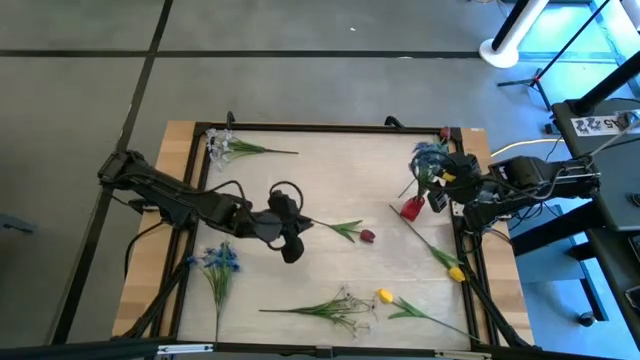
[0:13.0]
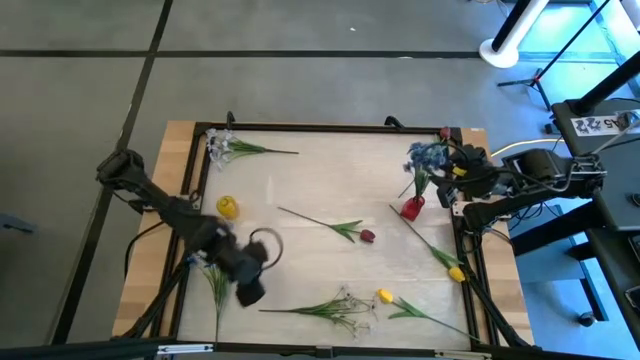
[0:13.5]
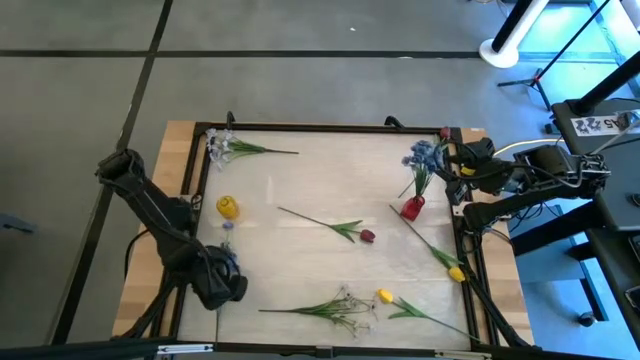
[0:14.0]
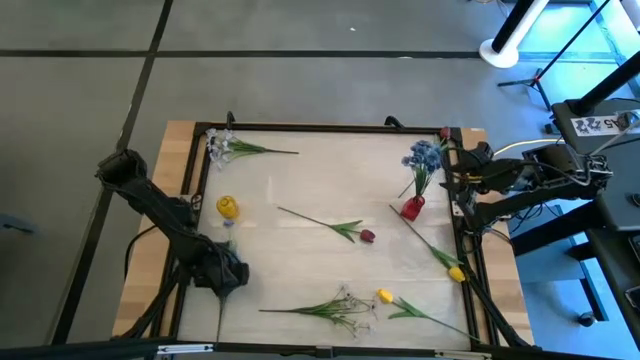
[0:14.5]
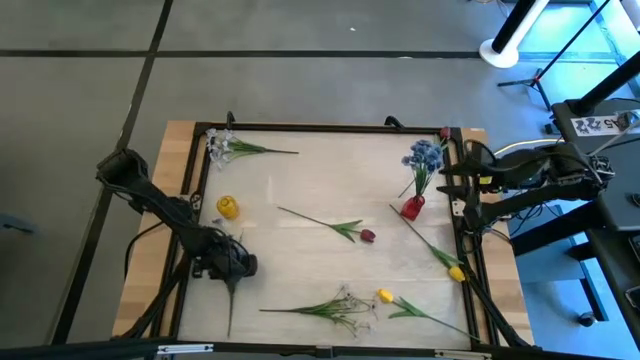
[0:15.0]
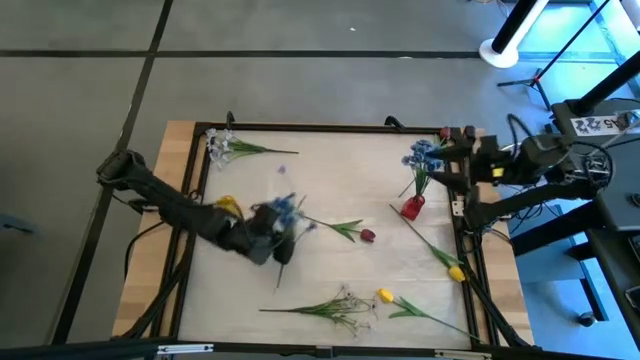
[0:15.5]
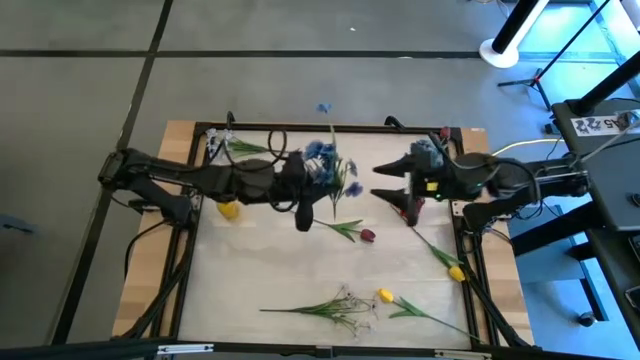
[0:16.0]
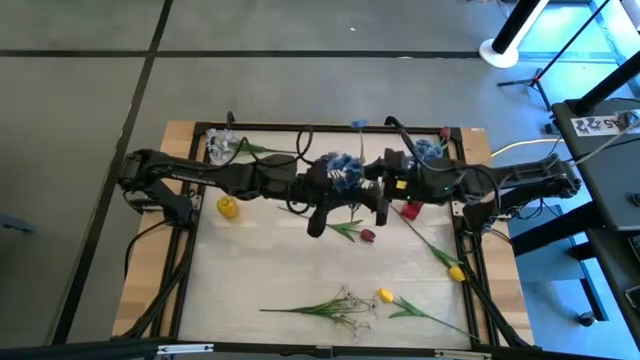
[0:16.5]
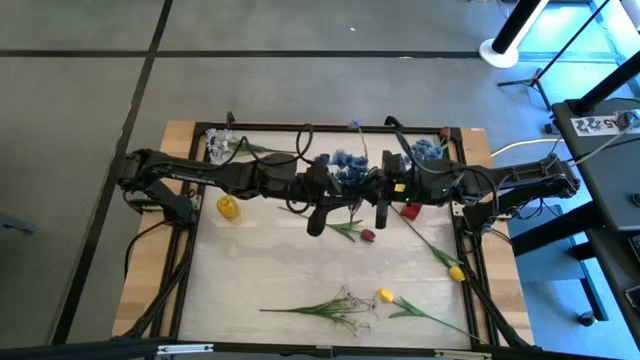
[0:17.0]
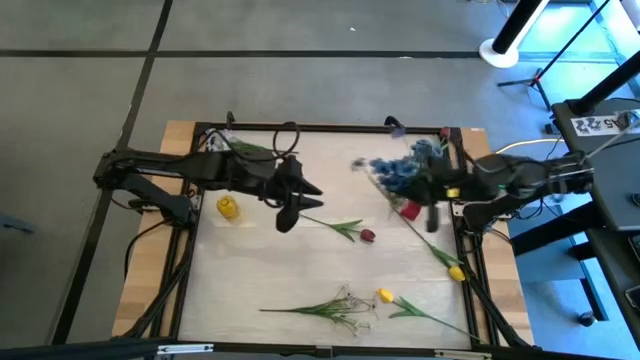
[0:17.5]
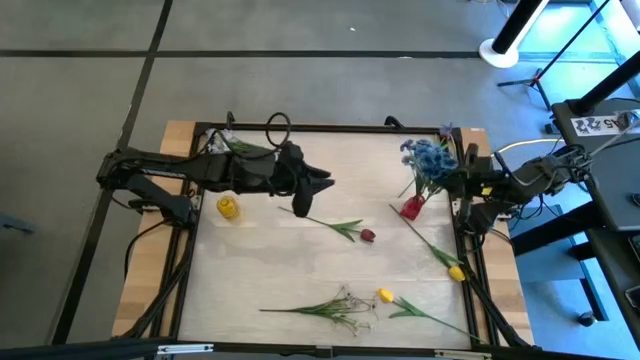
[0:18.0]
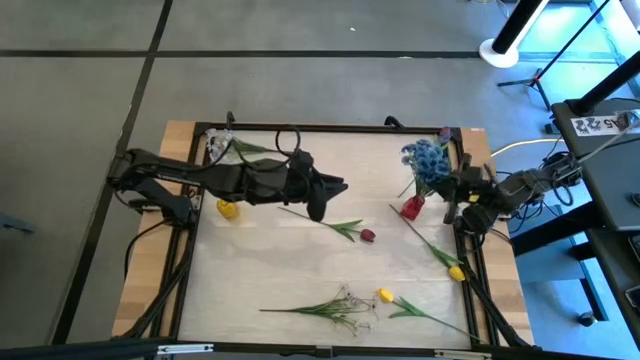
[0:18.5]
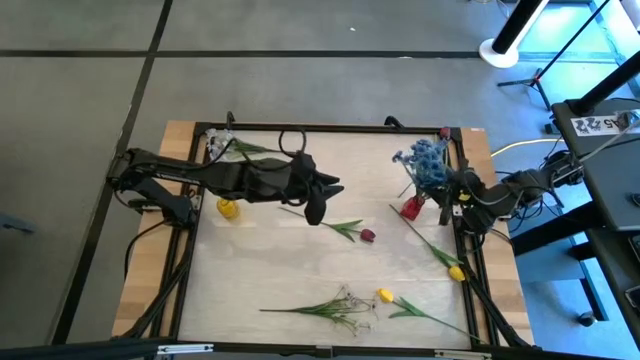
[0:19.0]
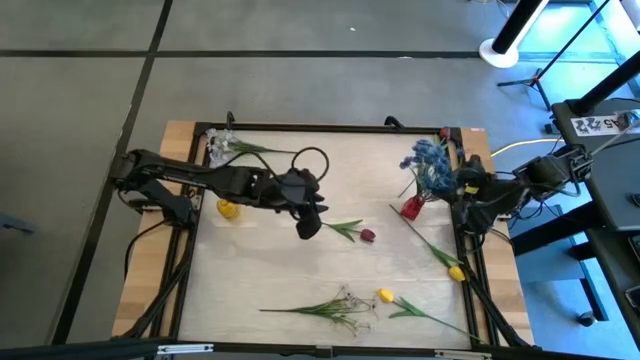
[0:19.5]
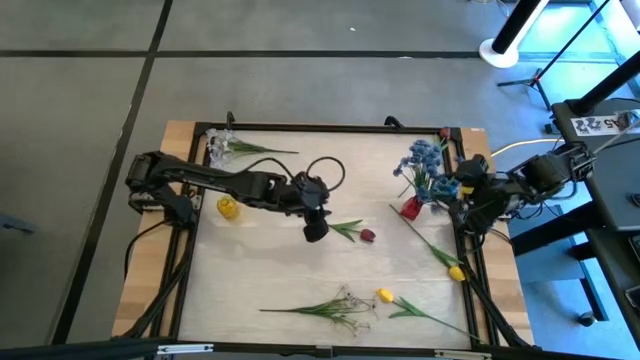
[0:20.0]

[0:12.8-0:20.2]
Task: Sort flowers into vase by color
Put the blue flower into the red vase

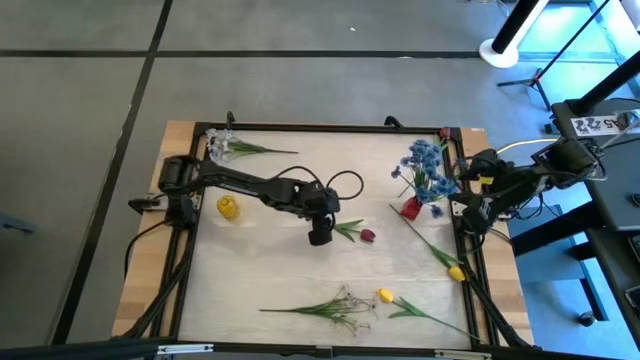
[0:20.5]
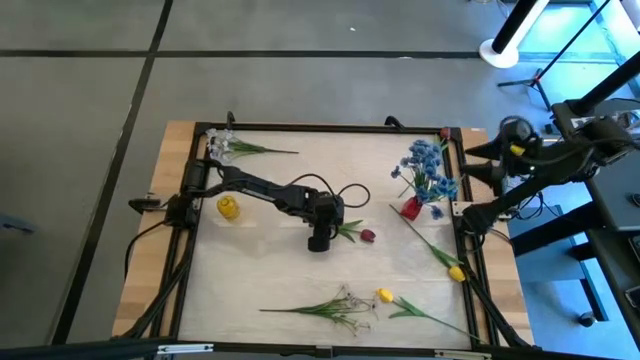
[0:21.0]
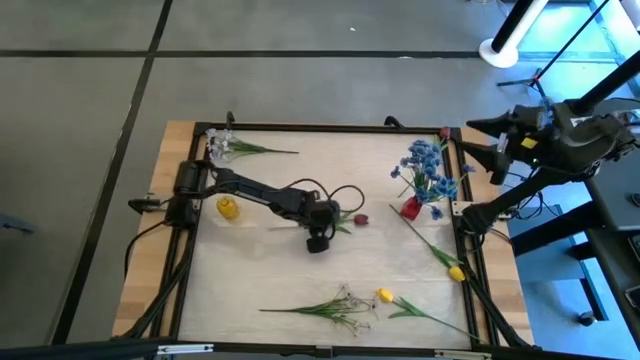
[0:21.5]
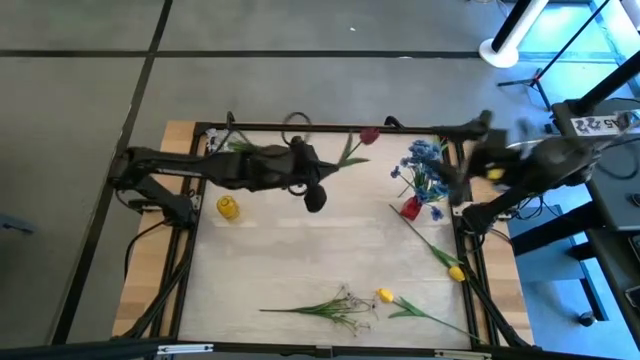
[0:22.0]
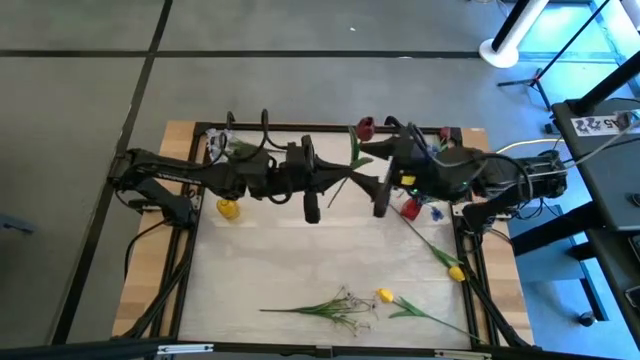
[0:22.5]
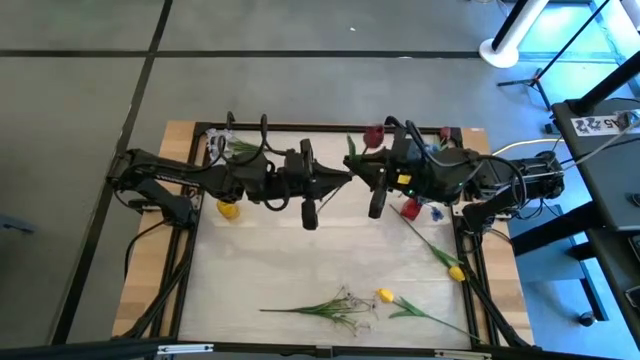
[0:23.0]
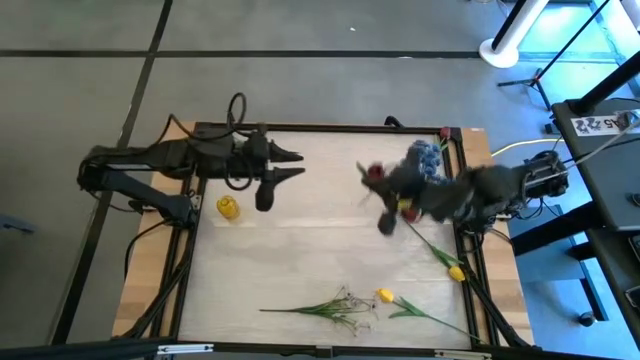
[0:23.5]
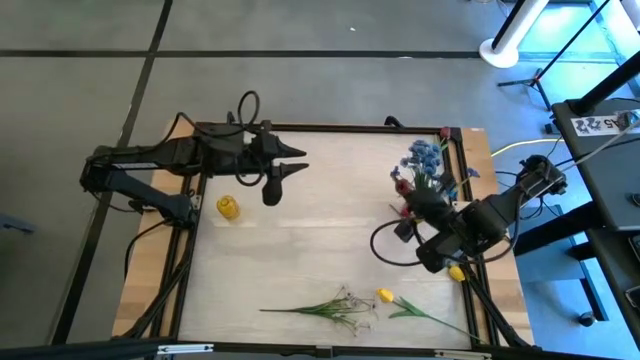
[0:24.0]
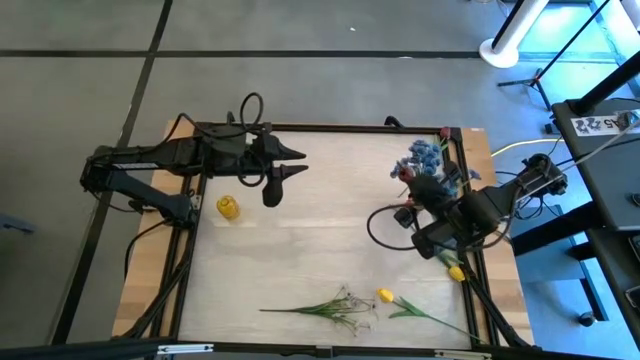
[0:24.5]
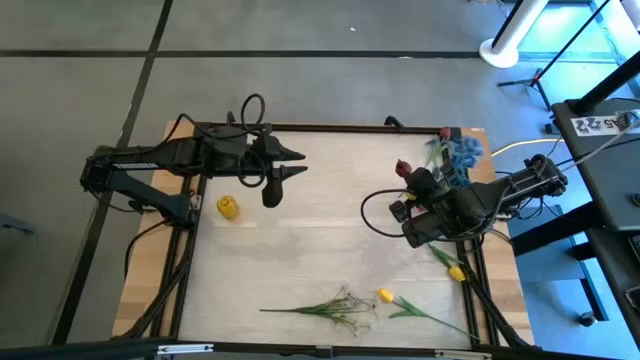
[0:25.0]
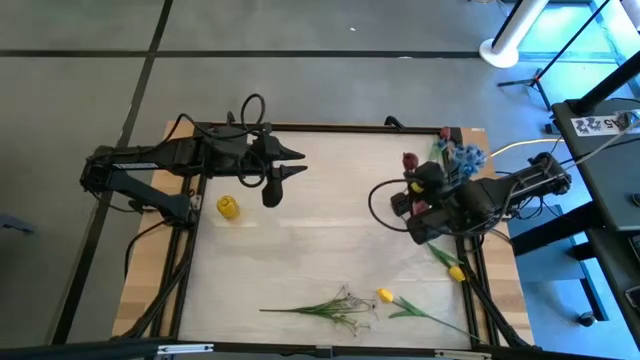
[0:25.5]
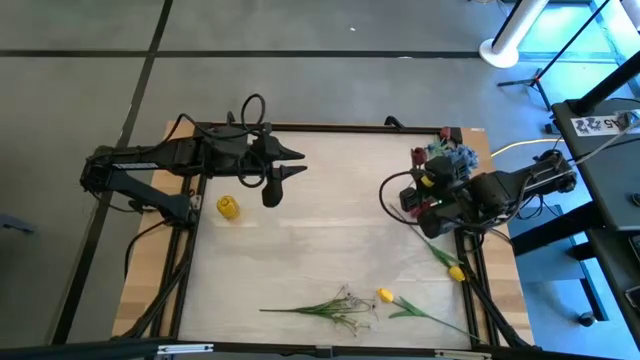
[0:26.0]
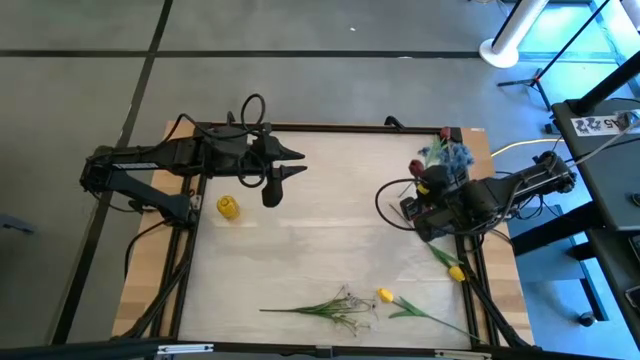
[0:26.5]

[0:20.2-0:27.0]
Put the bottom red flower into the red vase

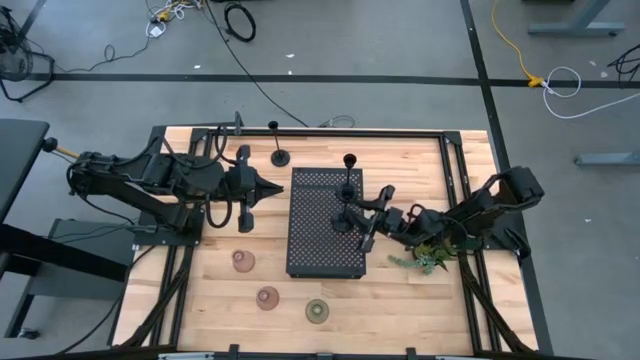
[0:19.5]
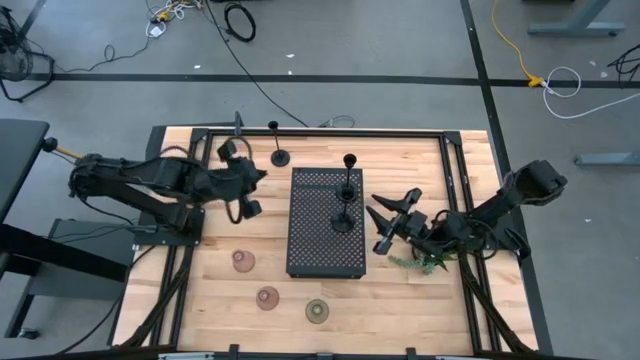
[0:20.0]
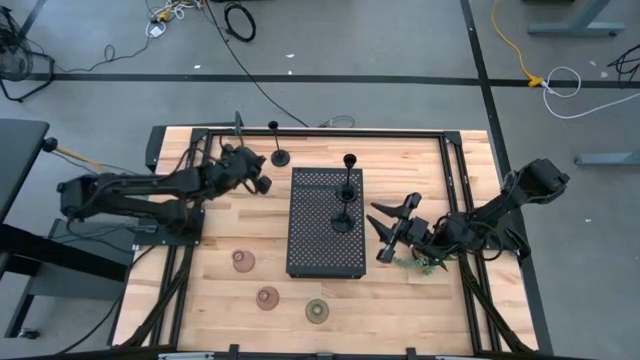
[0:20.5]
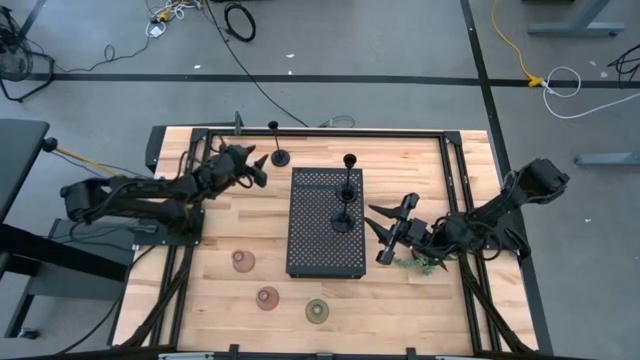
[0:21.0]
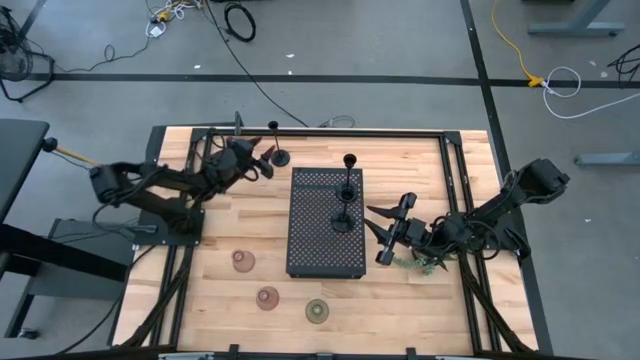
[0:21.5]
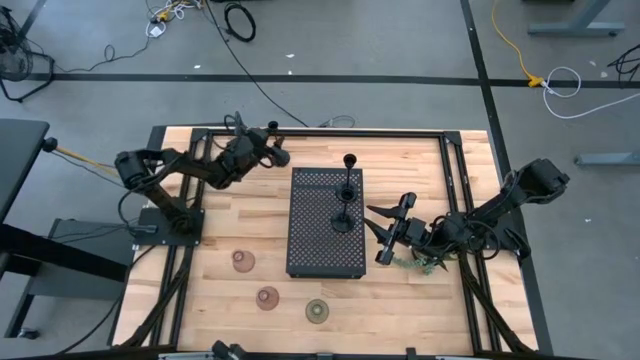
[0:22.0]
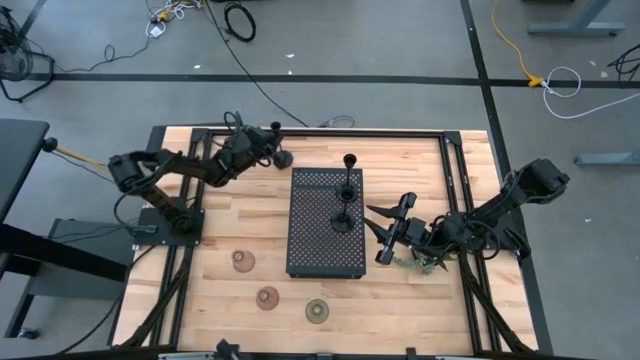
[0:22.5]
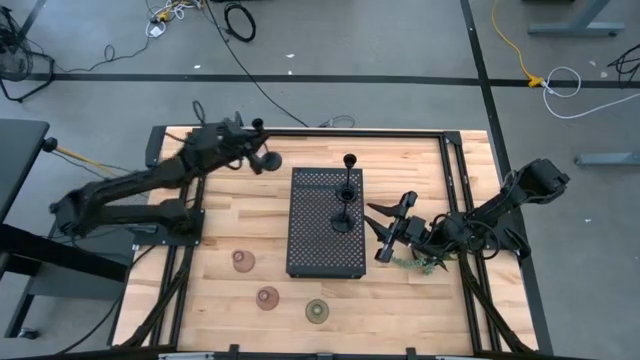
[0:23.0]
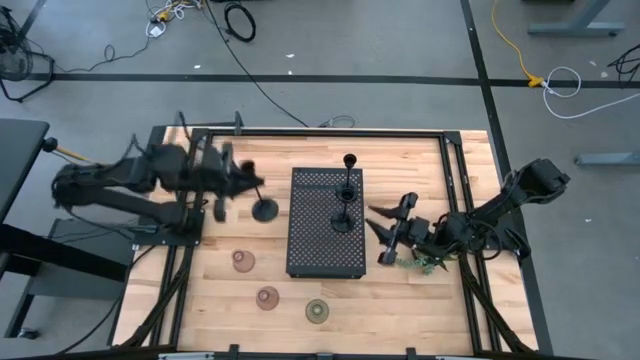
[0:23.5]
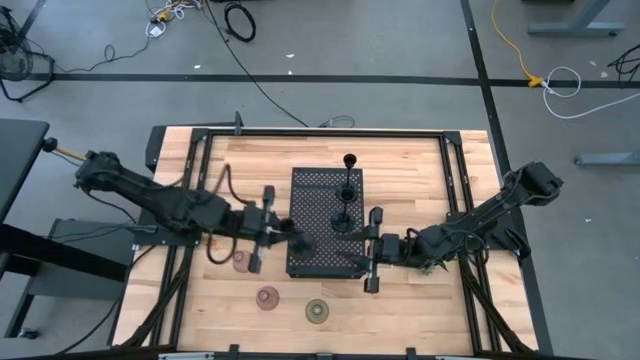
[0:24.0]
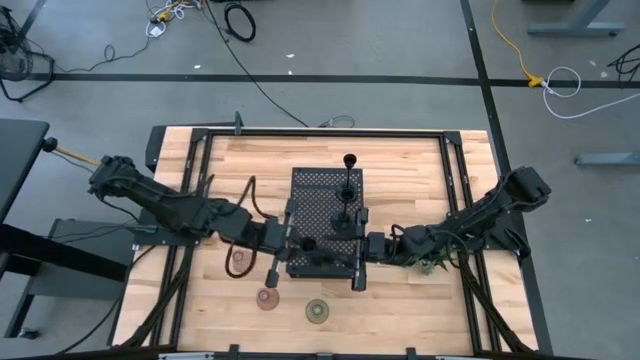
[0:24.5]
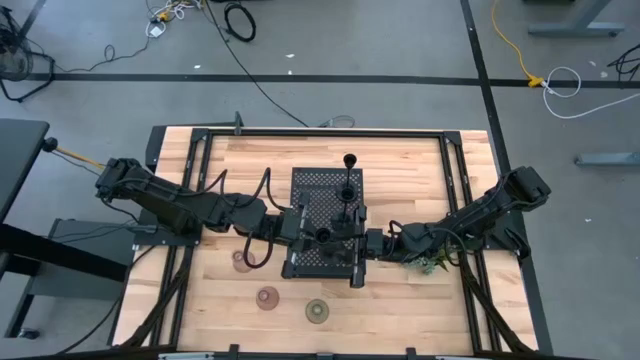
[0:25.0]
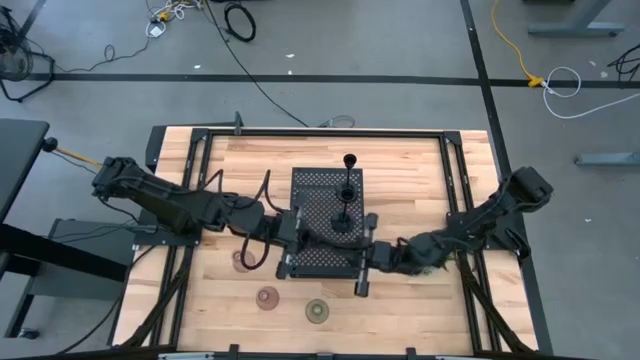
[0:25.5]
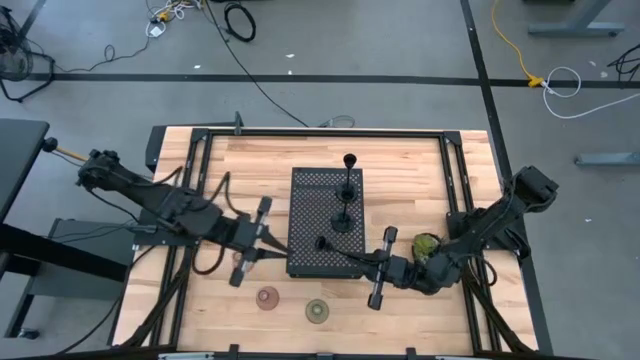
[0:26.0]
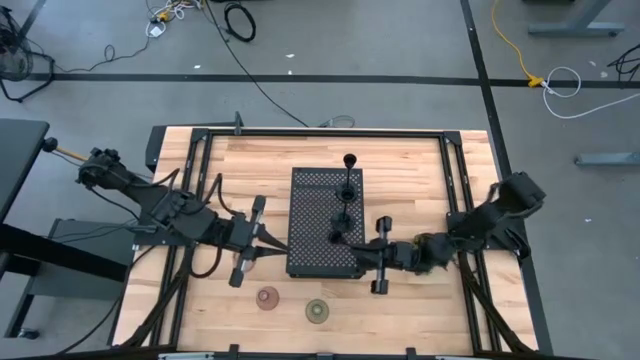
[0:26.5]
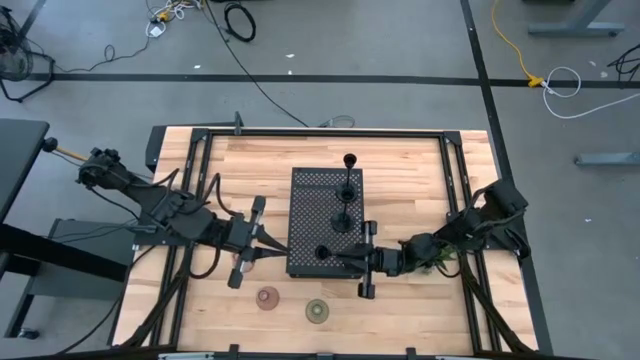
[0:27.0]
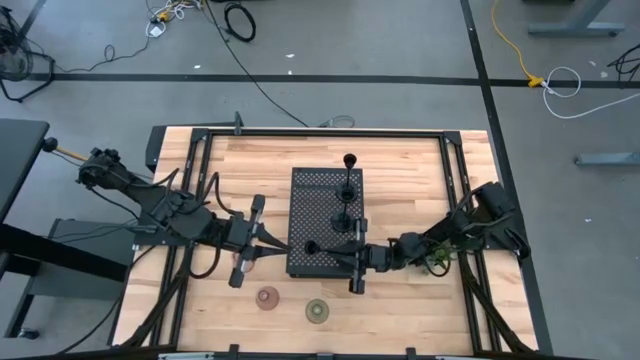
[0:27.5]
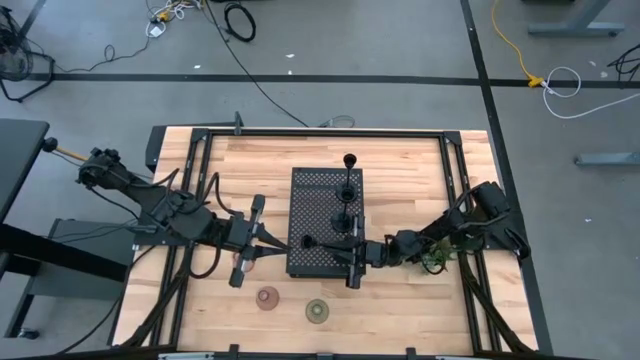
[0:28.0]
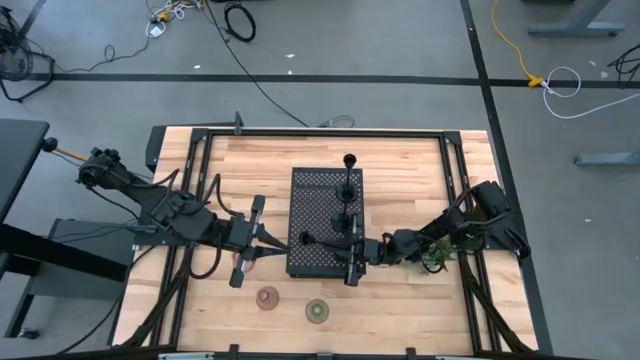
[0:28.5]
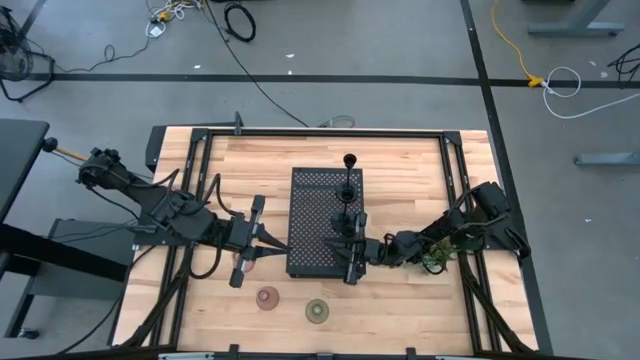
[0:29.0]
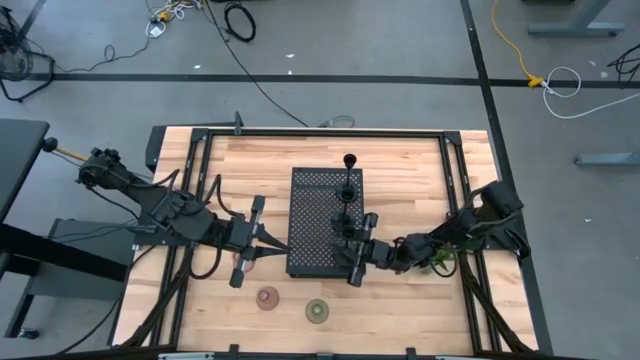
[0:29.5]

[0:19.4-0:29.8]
Task: Pick & Place candle stick holders
Put the black candle holder on the shelf aligned with the other black candle holders
